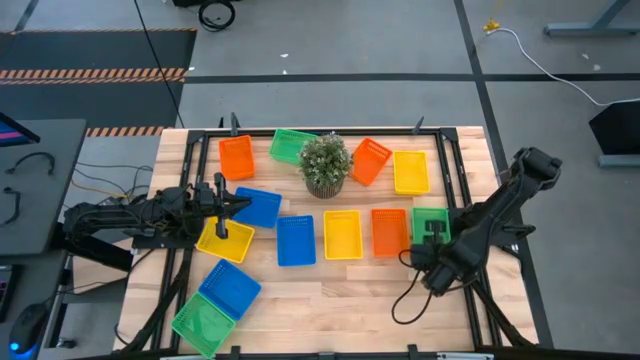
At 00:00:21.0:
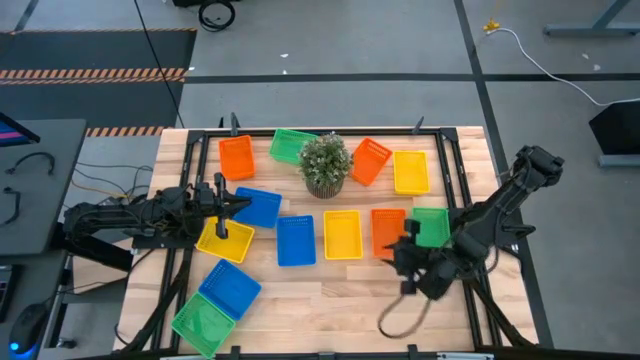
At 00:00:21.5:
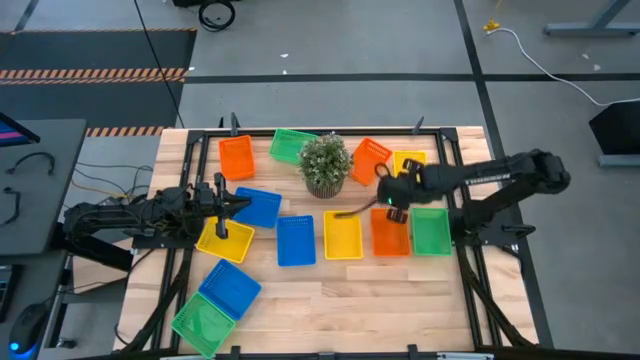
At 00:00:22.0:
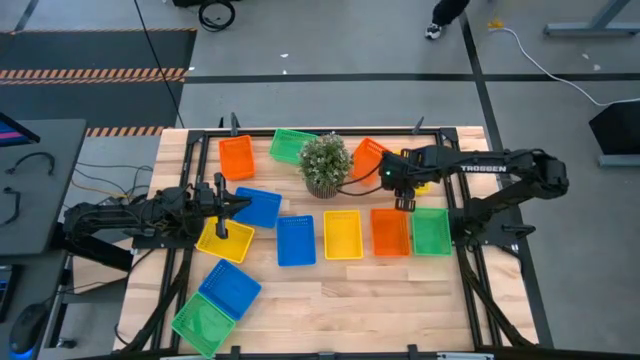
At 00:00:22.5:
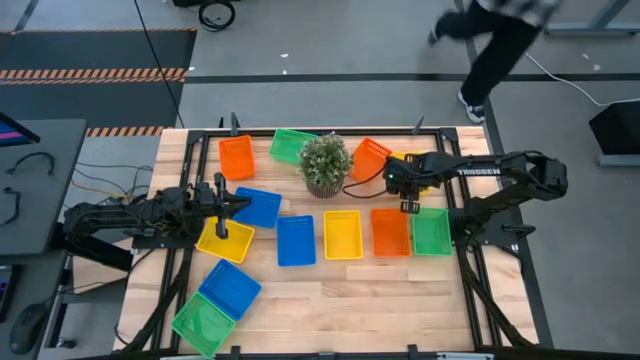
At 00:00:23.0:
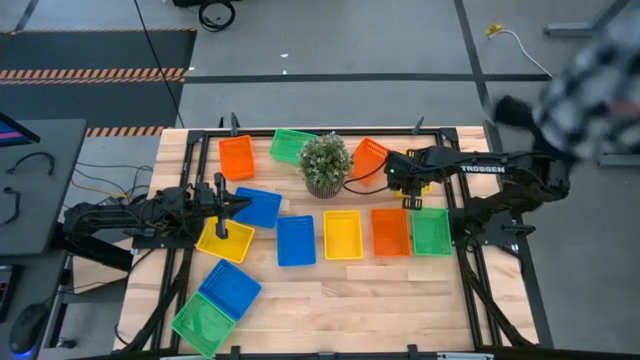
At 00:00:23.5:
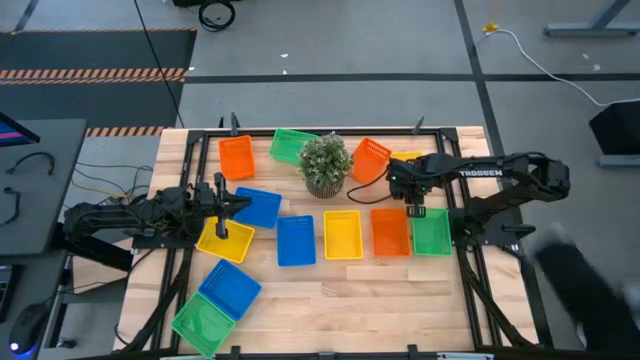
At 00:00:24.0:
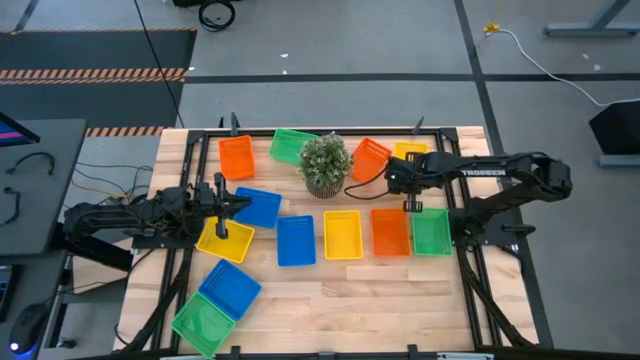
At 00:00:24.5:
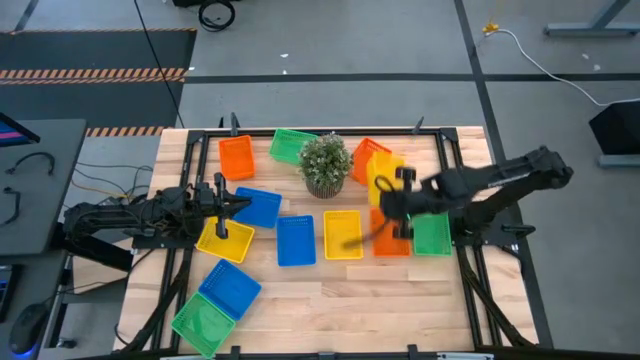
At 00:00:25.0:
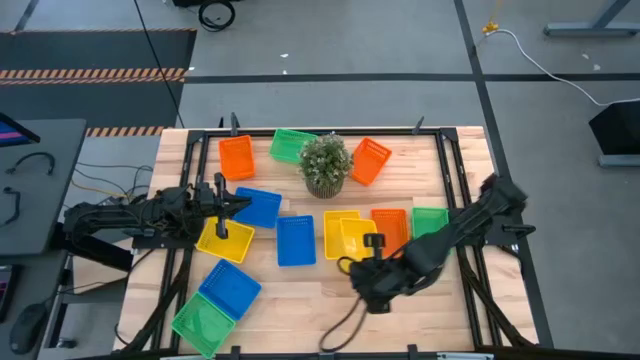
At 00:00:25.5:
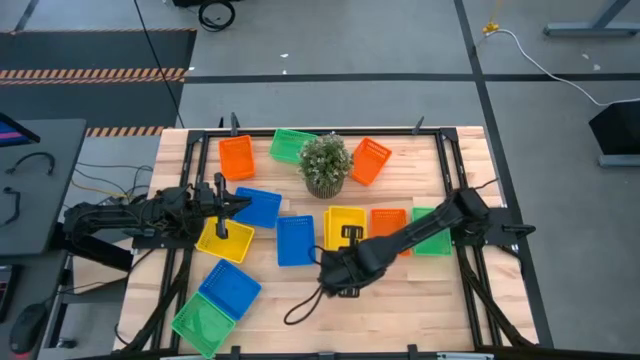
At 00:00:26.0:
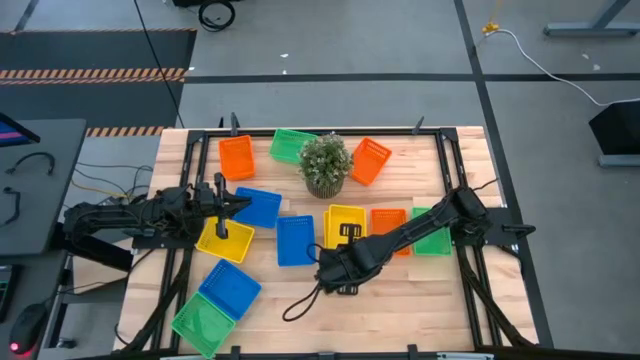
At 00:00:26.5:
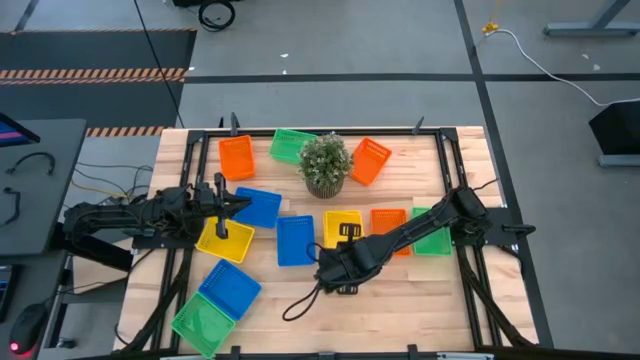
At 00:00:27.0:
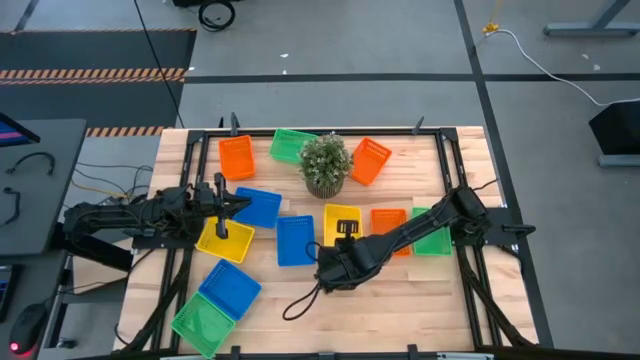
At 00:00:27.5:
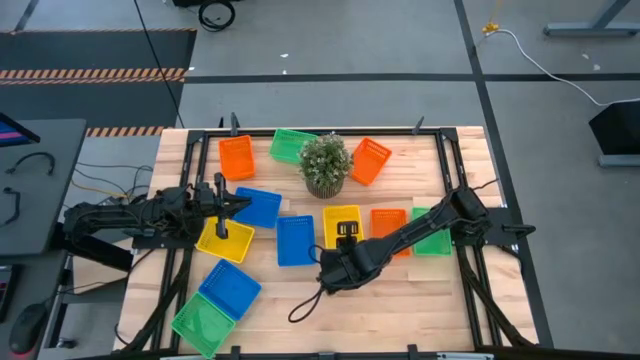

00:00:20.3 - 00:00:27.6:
Stack the top yellow bin on top of the bottom right yellow bin

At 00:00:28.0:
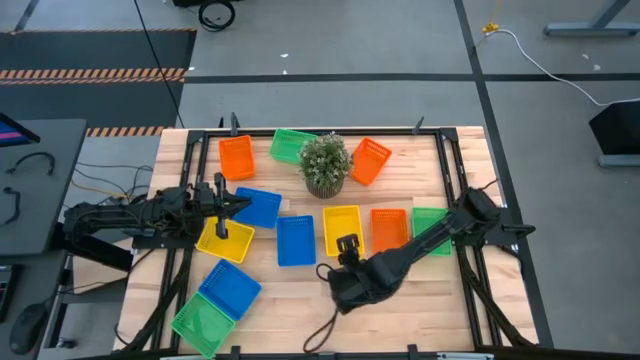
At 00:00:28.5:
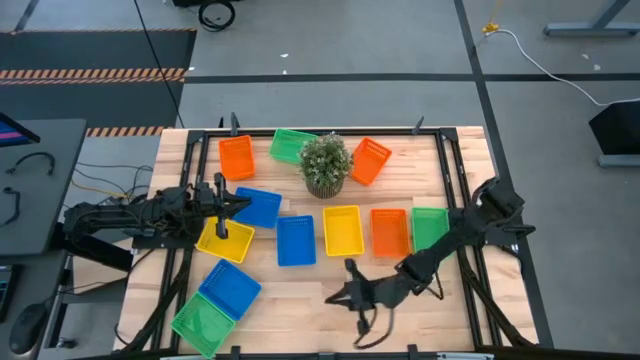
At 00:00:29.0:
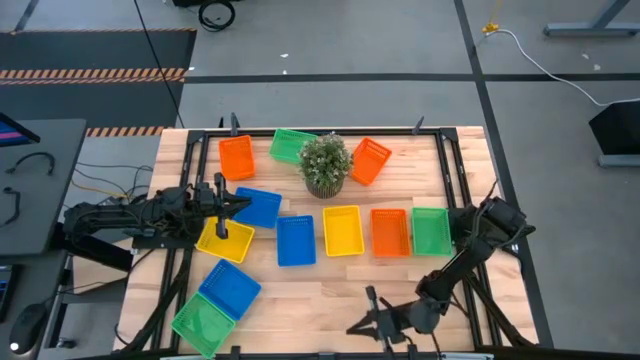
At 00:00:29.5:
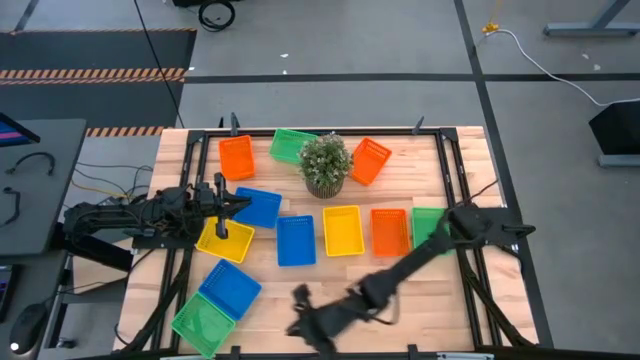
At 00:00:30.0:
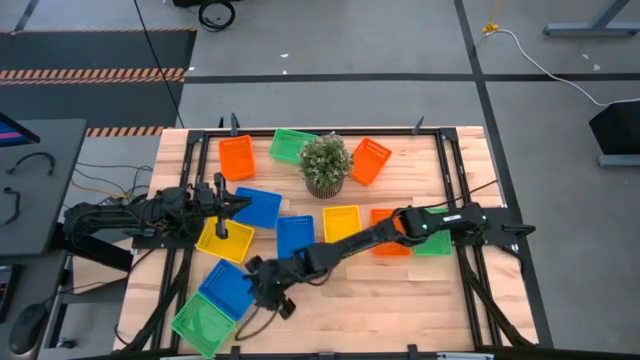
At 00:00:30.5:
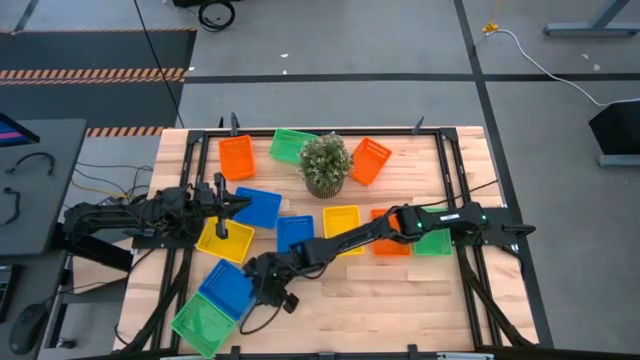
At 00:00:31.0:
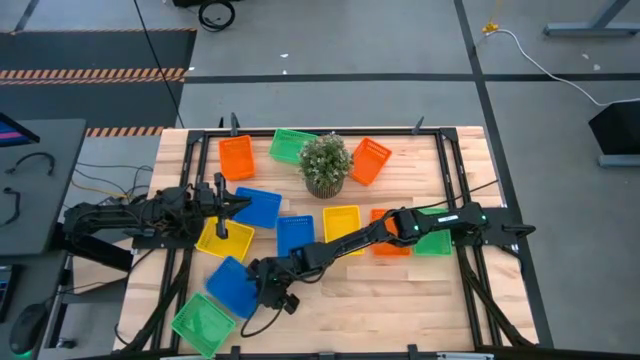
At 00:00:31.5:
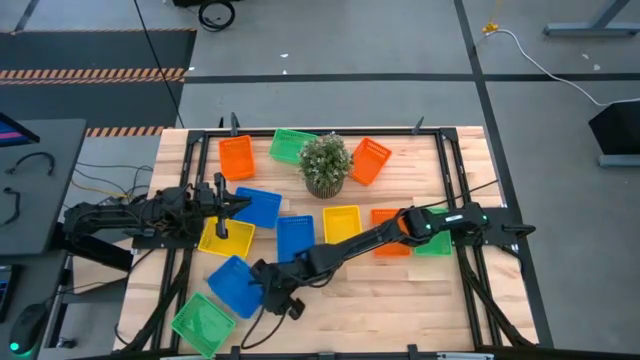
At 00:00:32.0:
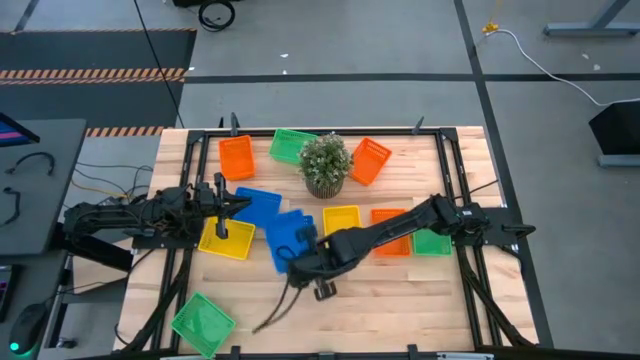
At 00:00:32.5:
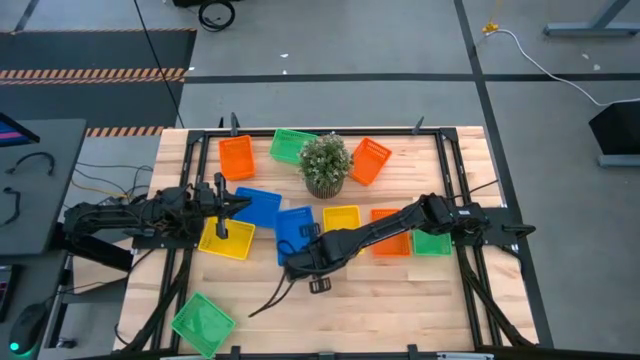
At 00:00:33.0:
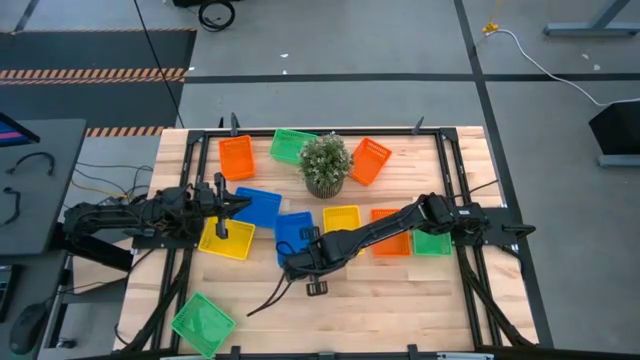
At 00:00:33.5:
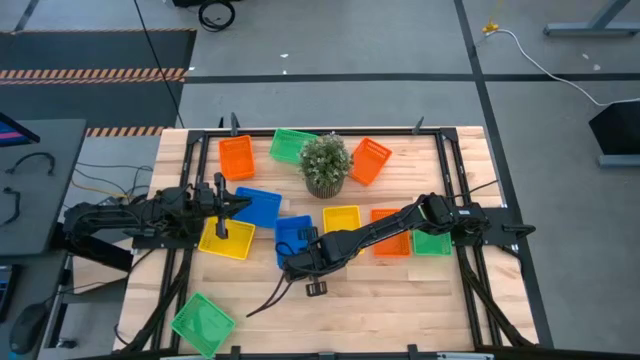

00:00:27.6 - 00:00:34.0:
Stack the bottom blue bin on top of the middle blue bin

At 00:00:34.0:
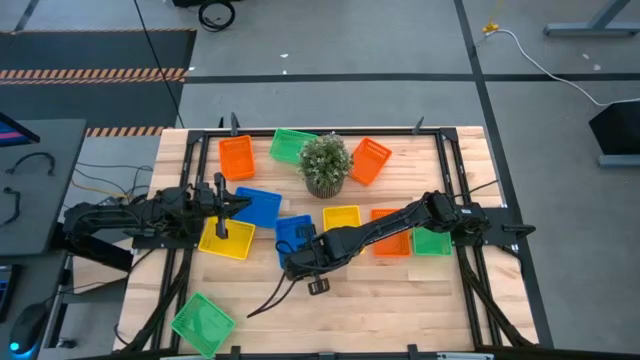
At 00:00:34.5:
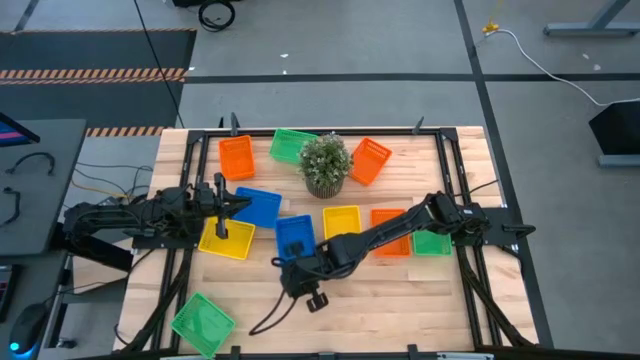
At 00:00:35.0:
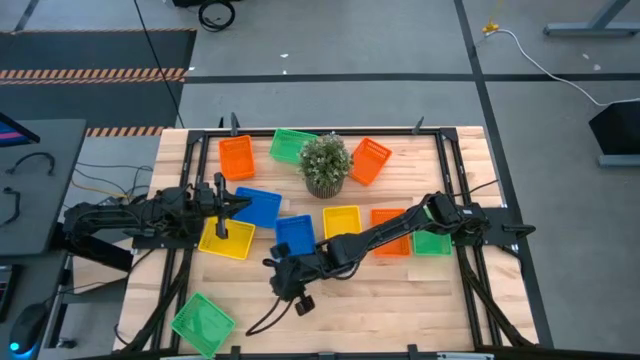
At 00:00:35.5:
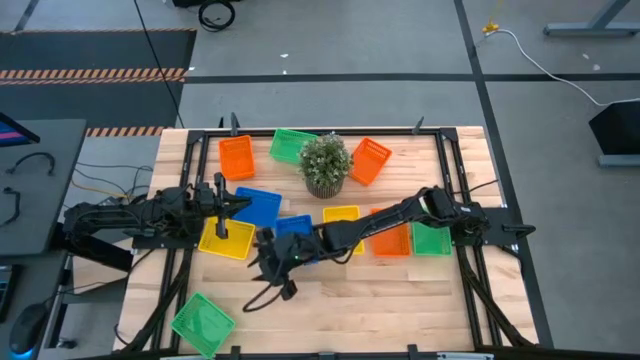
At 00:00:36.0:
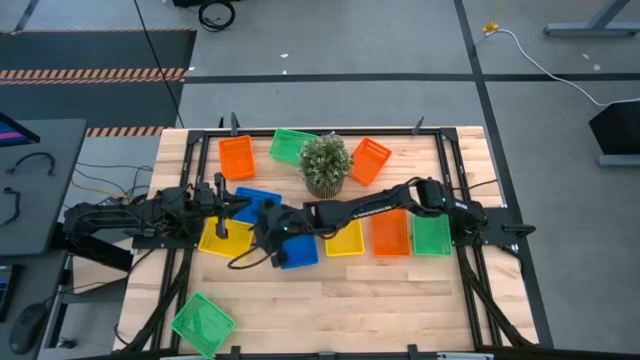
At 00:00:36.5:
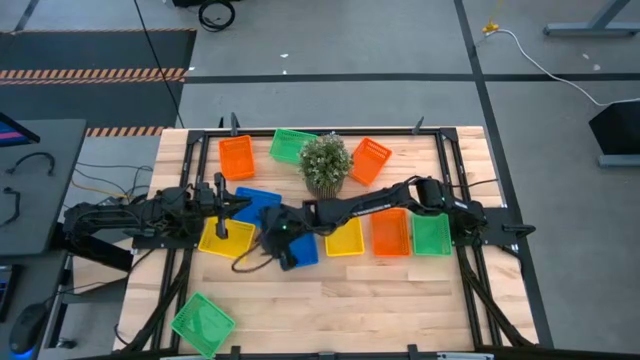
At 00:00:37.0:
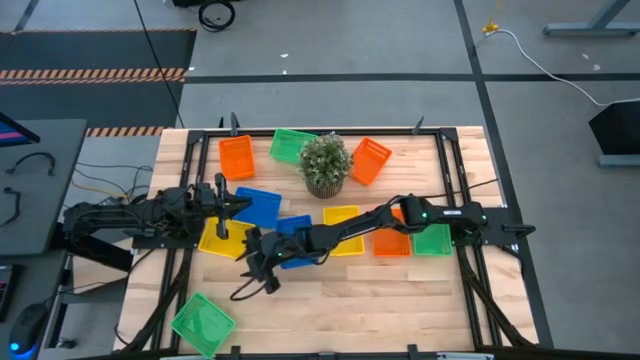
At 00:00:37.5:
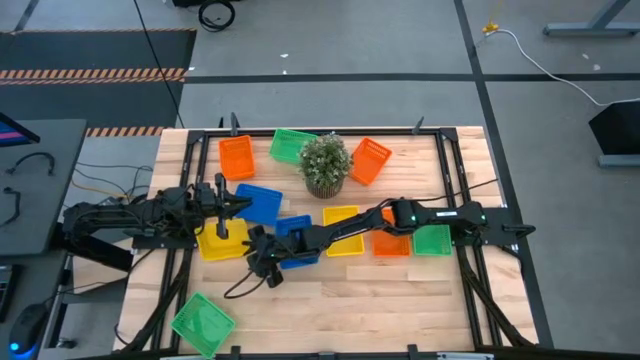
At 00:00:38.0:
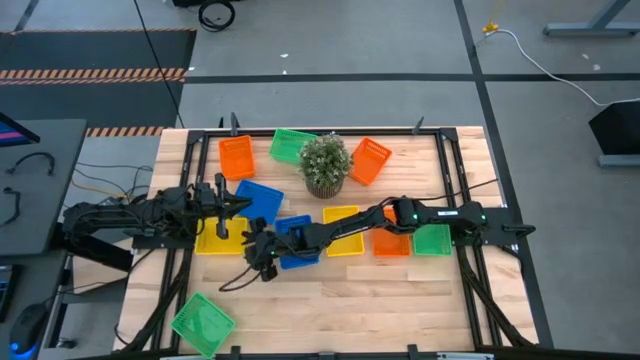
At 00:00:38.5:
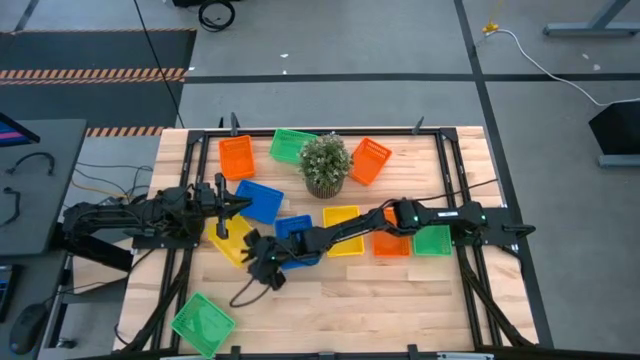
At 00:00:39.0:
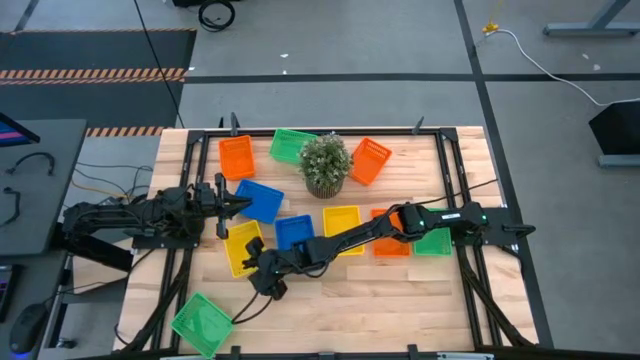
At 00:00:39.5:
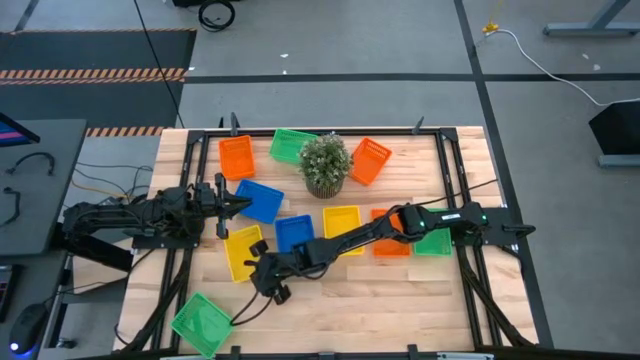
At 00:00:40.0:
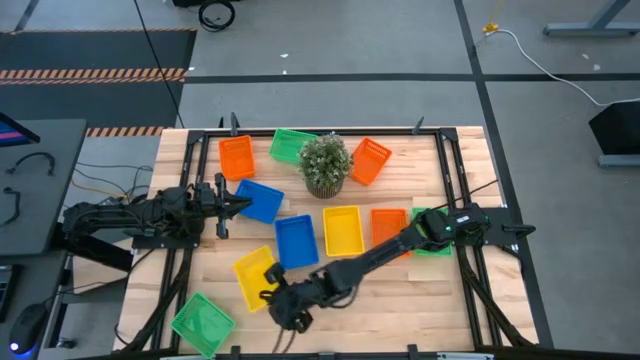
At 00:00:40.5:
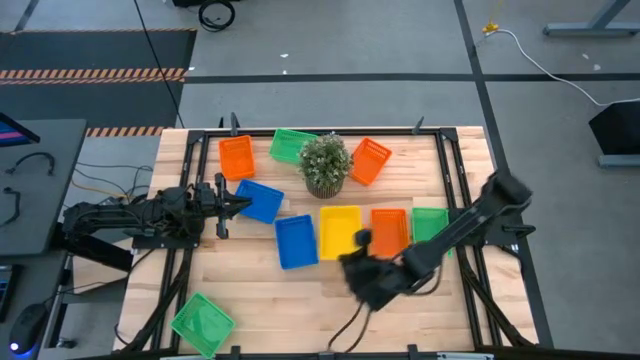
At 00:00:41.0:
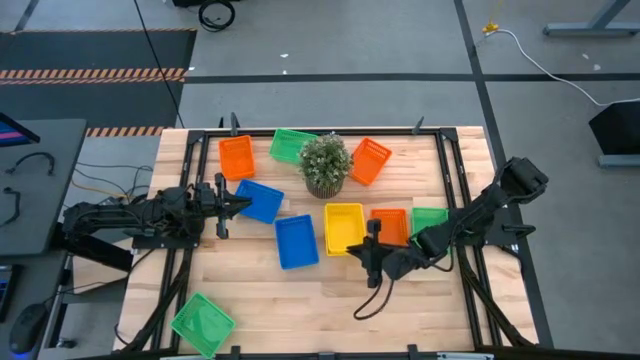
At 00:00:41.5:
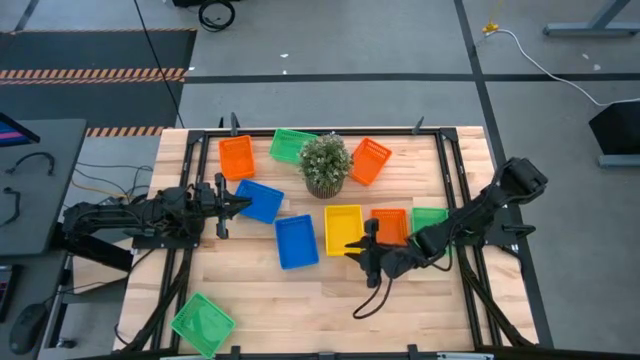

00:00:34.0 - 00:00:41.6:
Stack the left yellow bin on top of the right yellow bin
